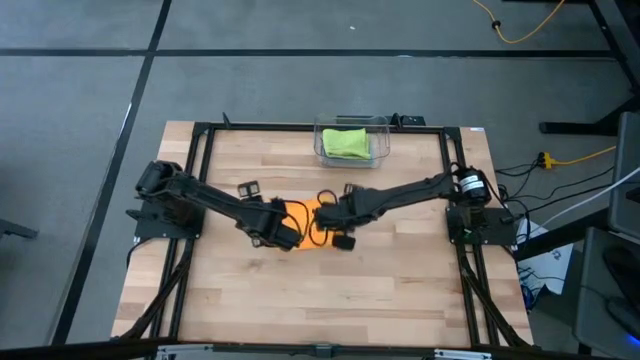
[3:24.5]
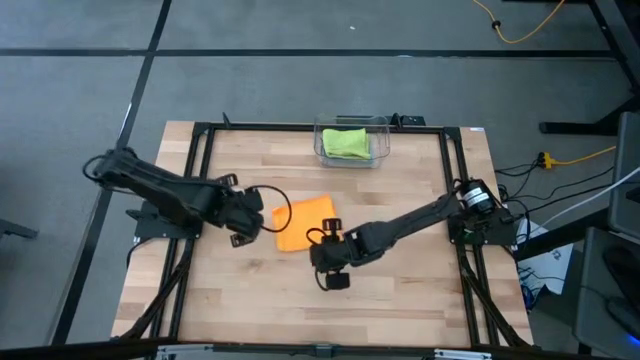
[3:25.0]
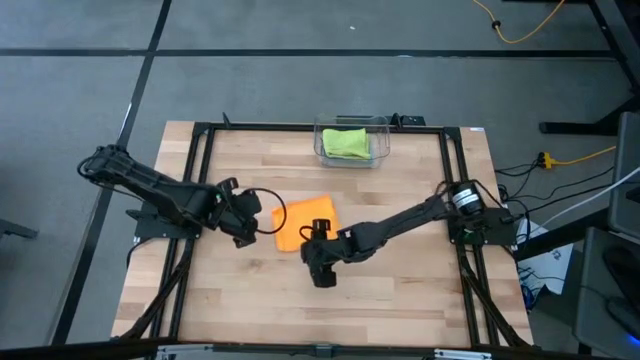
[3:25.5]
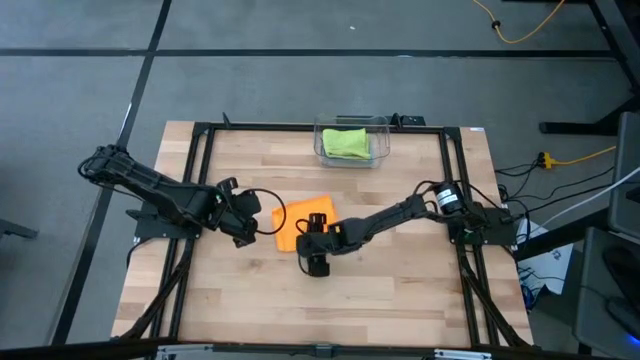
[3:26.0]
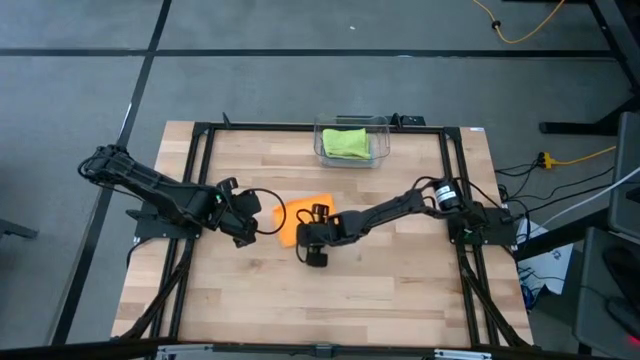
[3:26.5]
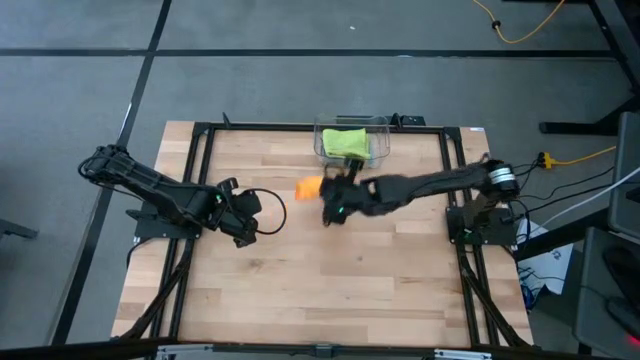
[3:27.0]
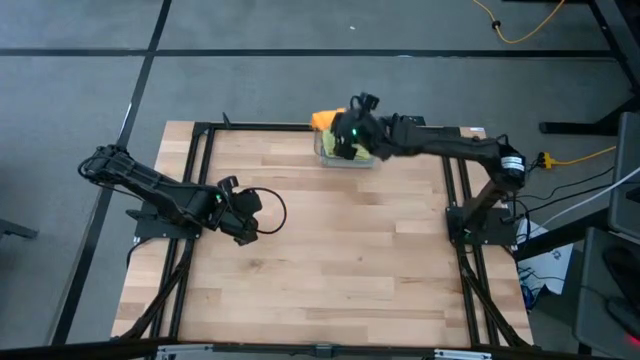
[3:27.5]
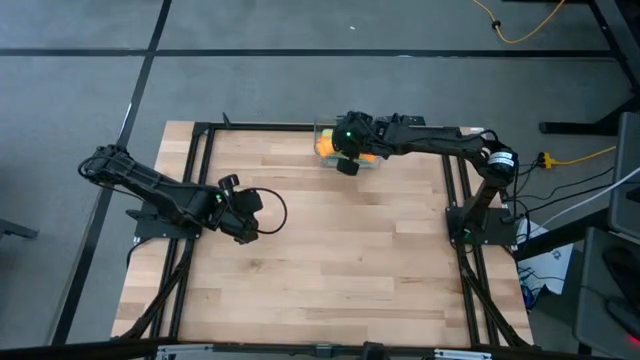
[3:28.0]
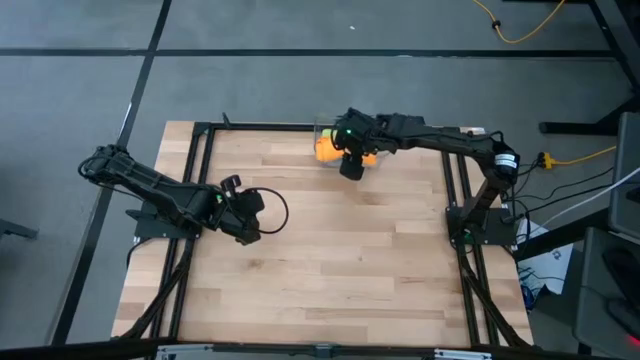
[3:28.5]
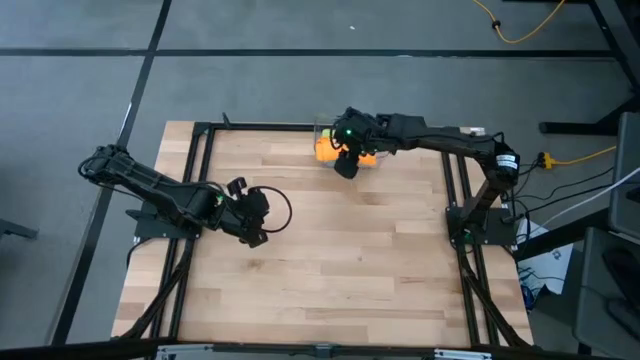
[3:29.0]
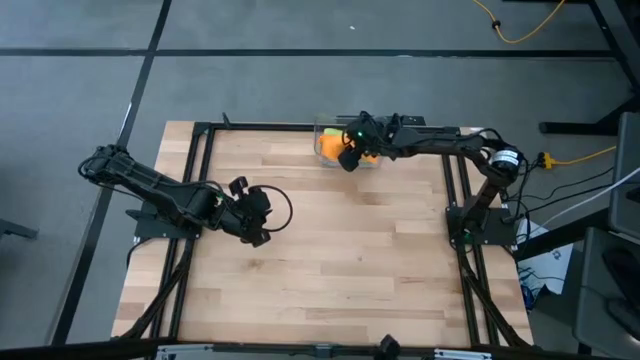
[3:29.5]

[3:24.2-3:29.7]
Task: Fold microfiber towels
Put the orange microfiber towel into the transparent bin

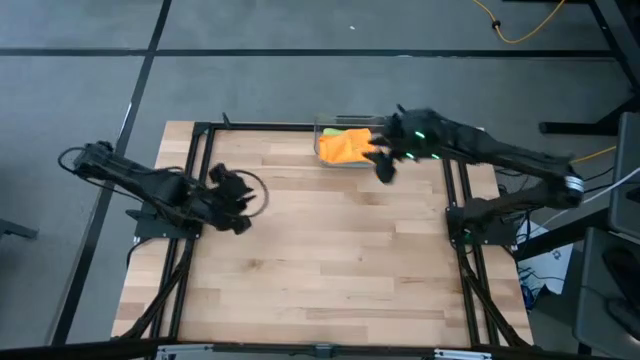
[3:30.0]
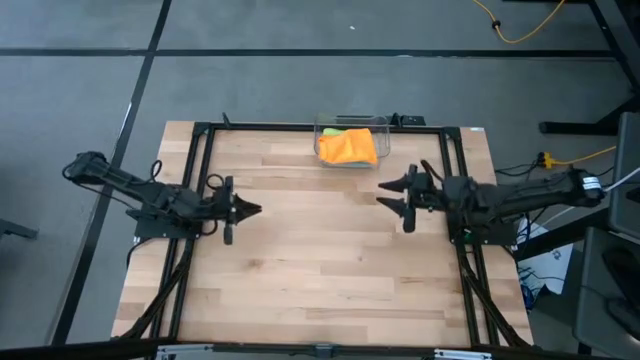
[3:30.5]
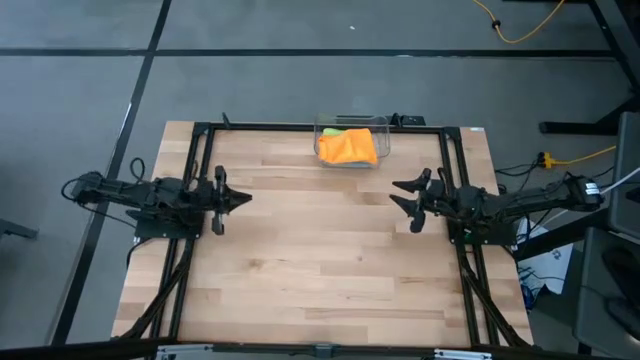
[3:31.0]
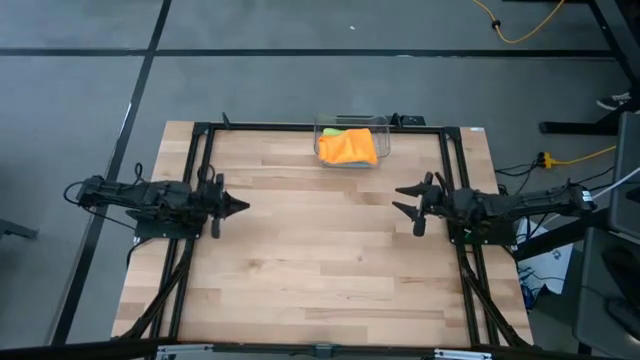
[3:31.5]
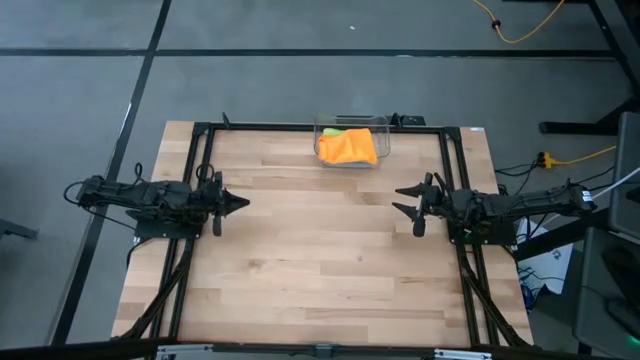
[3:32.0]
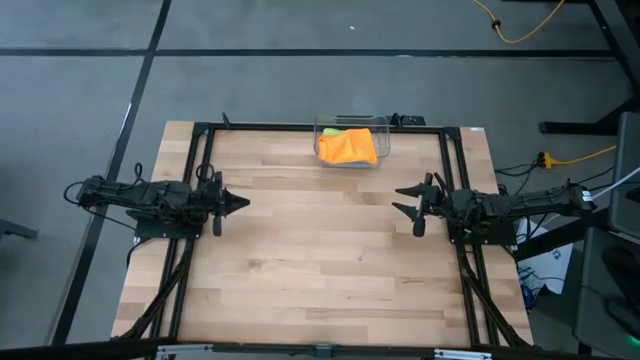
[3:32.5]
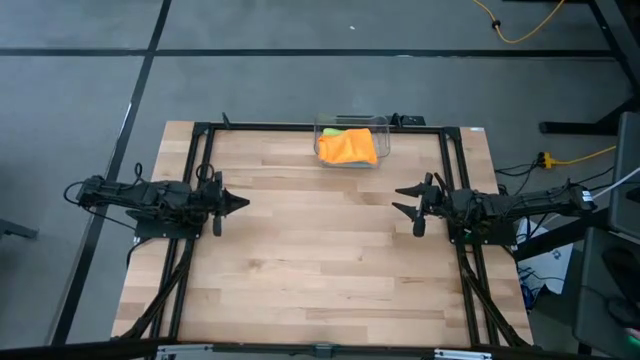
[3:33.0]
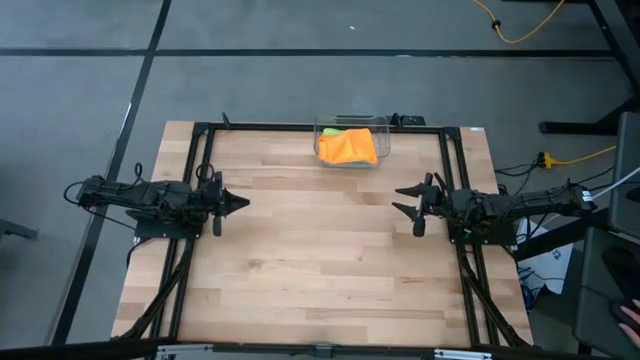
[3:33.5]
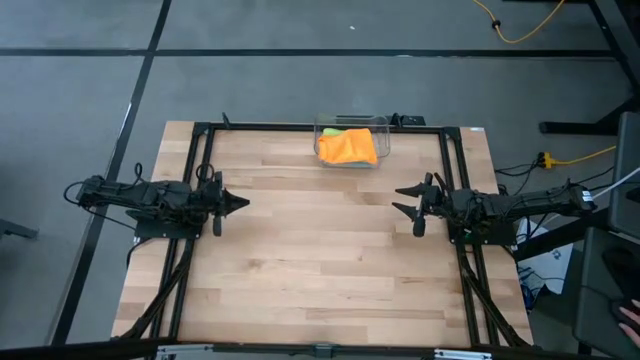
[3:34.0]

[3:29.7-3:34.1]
Return to Home Position

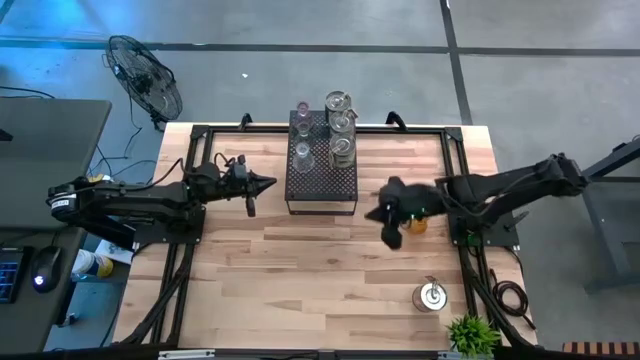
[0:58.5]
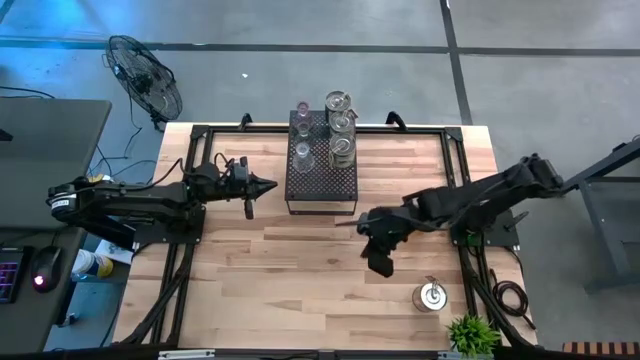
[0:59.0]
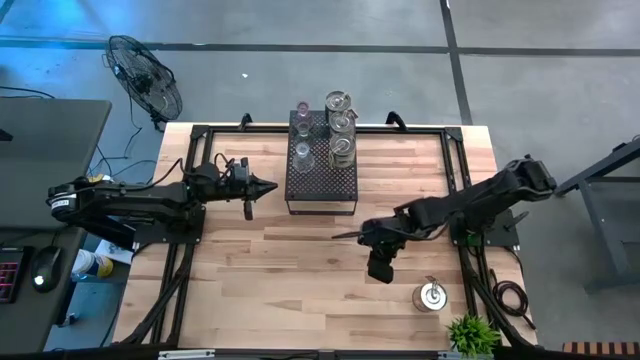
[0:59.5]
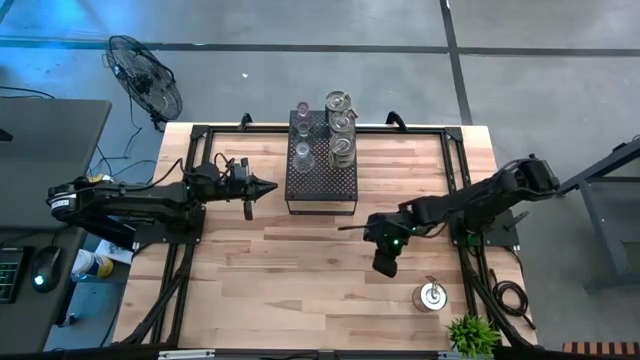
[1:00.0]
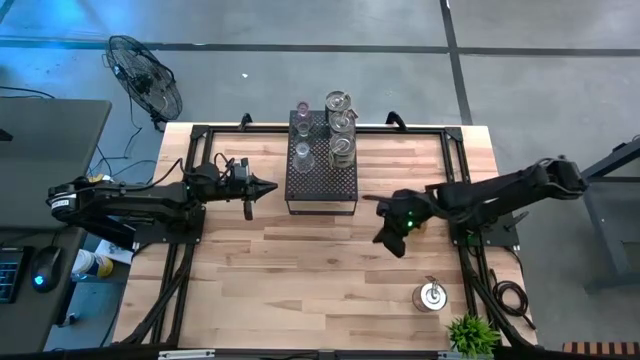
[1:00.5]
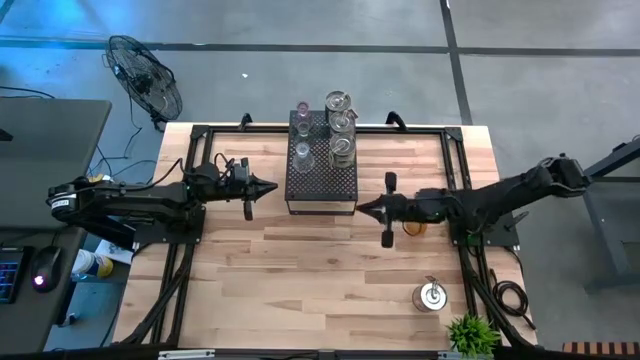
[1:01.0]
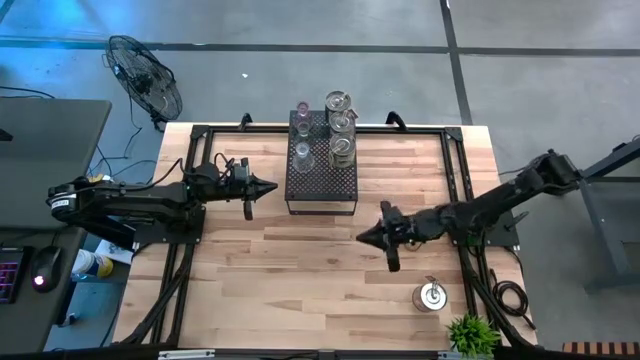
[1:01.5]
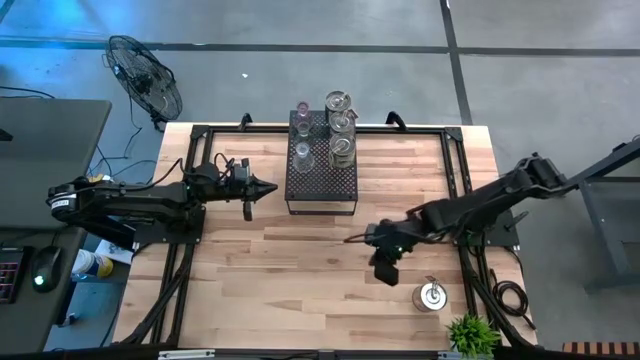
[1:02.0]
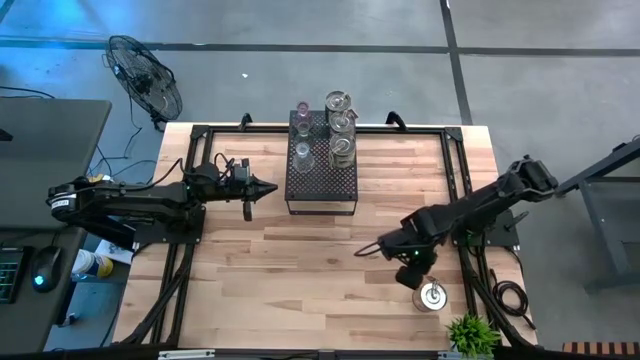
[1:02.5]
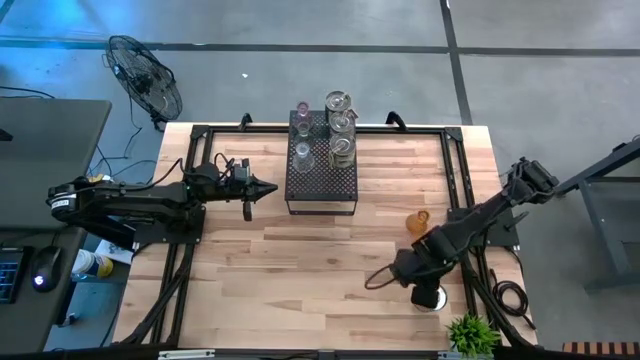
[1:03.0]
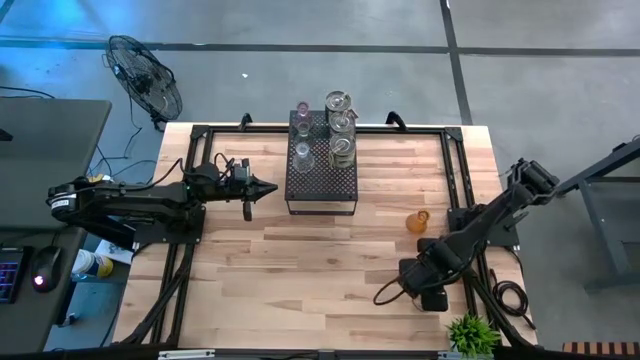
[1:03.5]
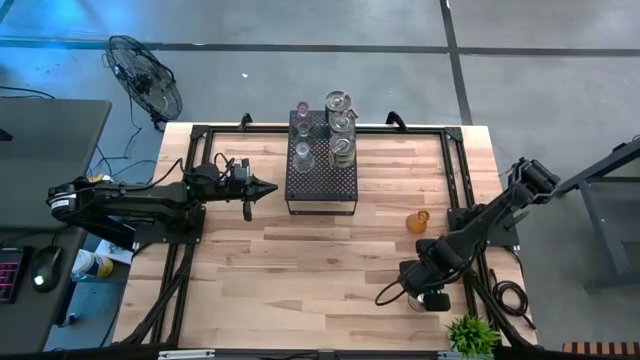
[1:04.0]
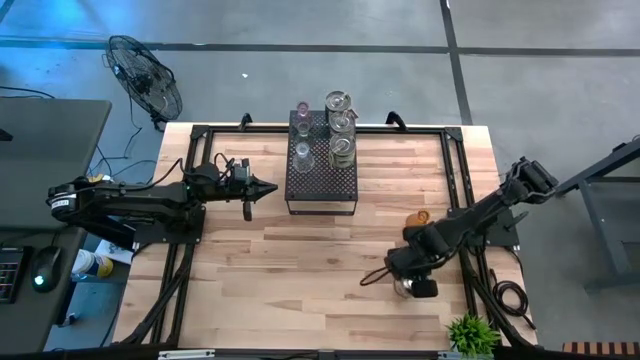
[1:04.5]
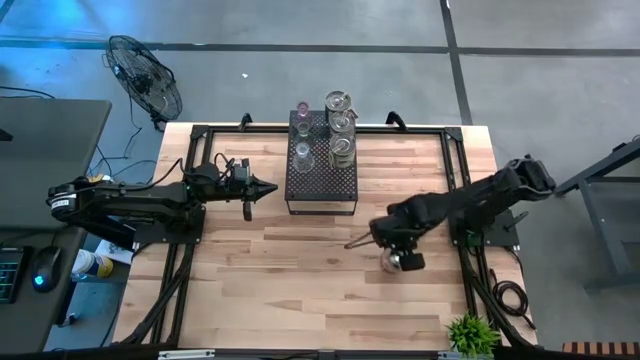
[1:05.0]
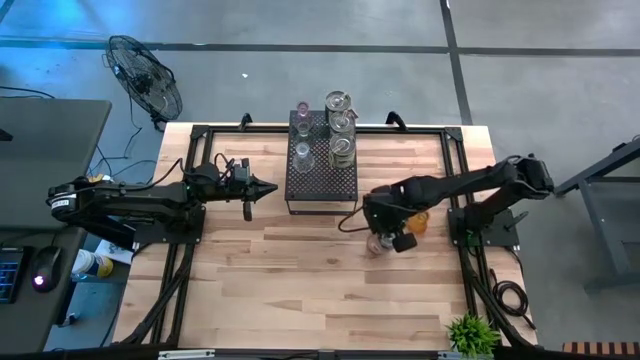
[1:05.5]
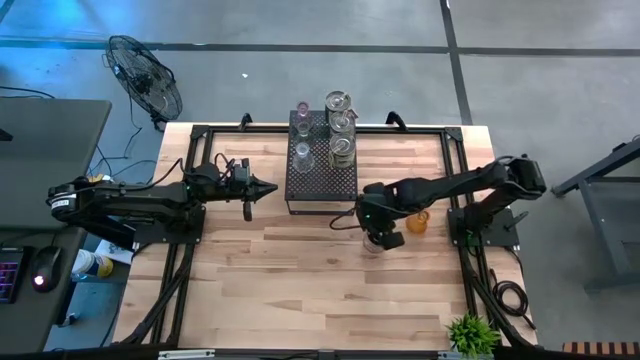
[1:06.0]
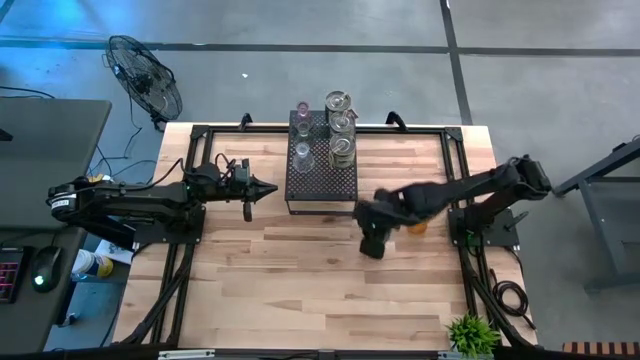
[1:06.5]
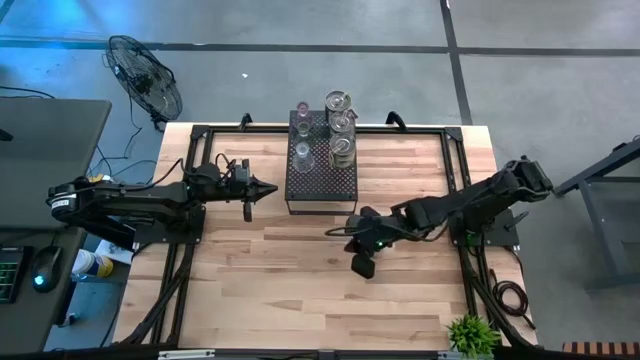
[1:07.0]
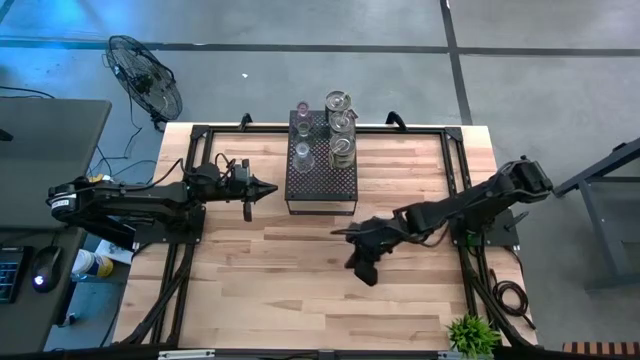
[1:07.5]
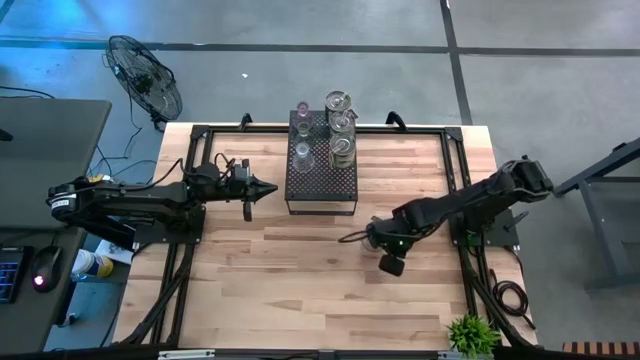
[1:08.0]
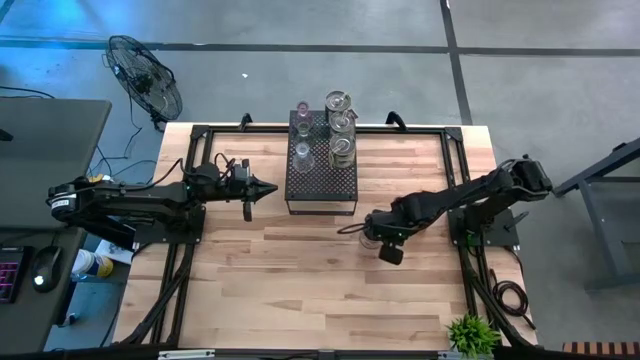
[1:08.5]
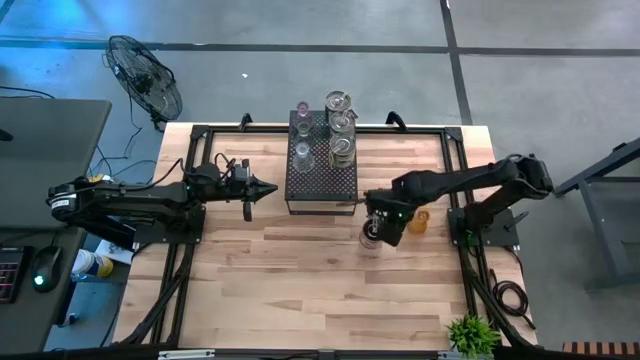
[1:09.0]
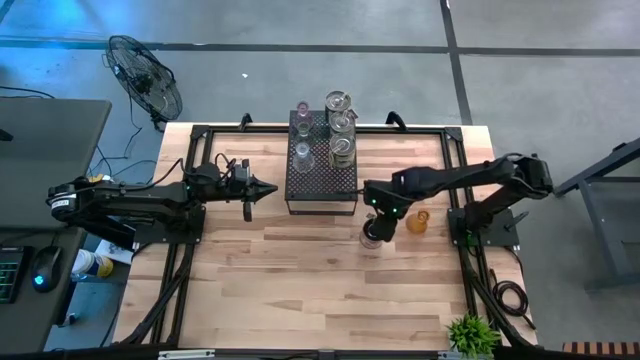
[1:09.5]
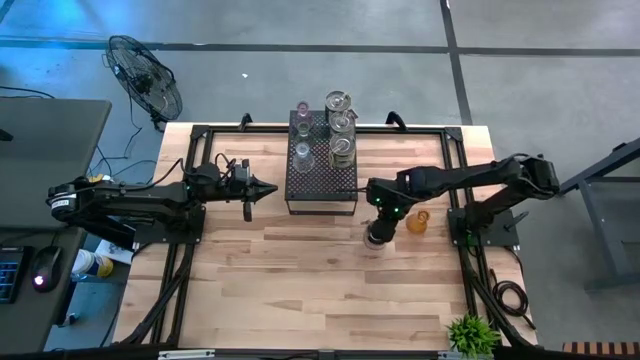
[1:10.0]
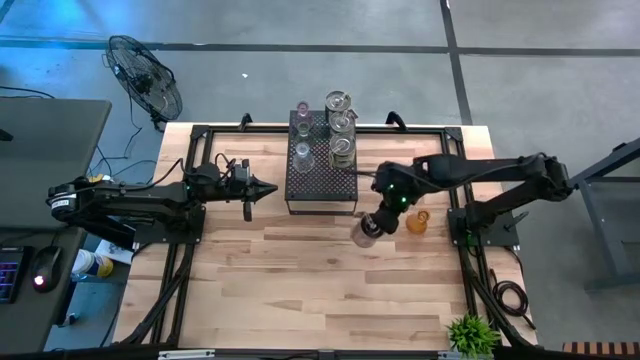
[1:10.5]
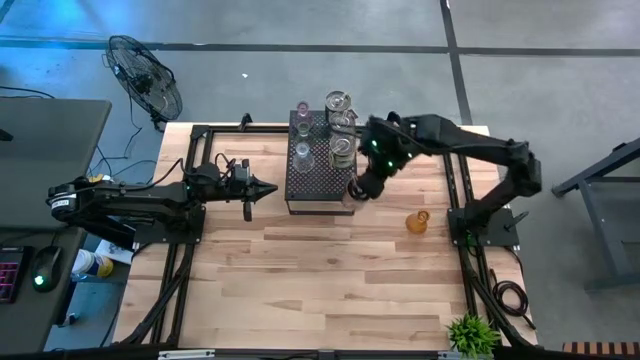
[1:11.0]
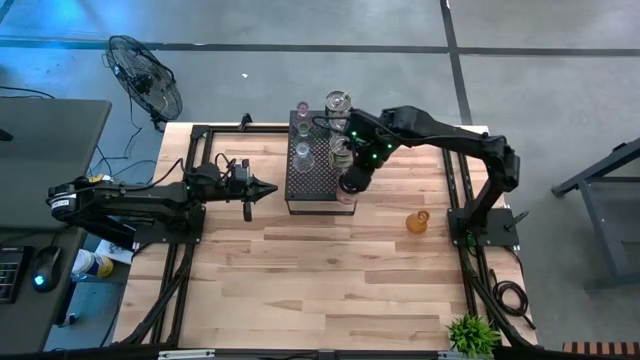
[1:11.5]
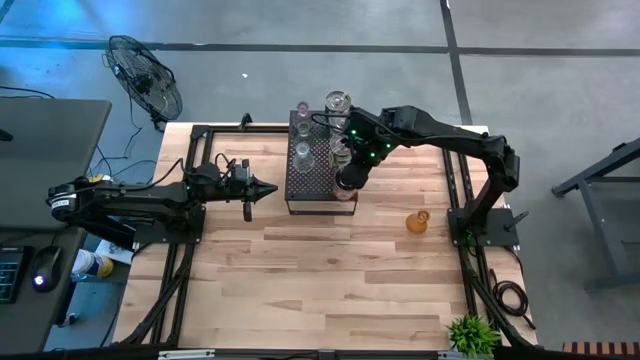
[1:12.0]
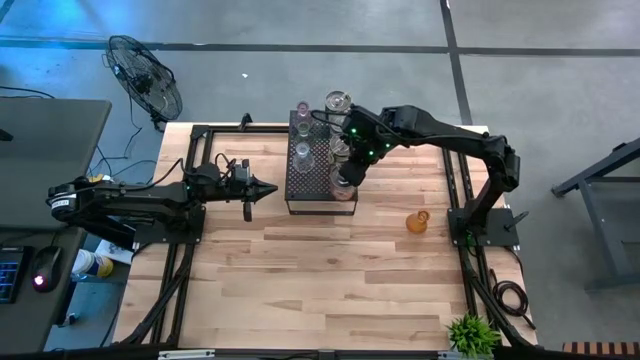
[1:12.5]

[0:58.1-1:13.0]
Task: Pick & Place candle stick holders
Put the yellow scented candle on the shelf
